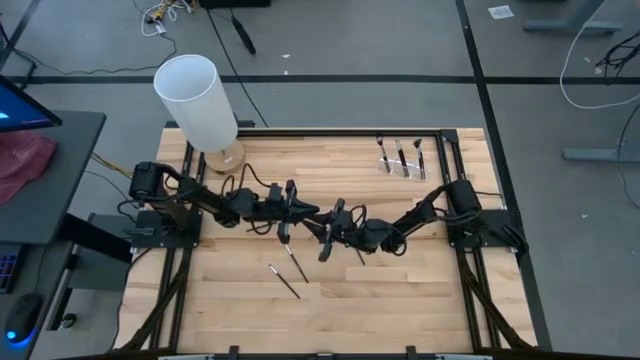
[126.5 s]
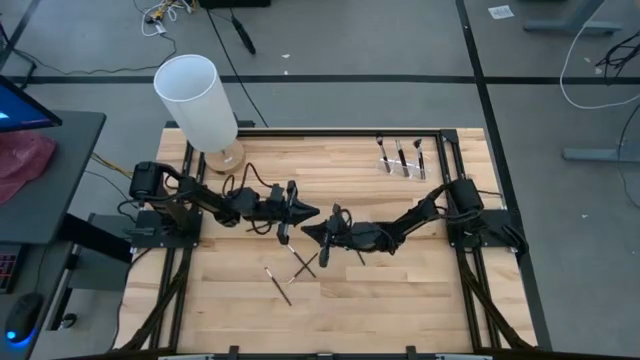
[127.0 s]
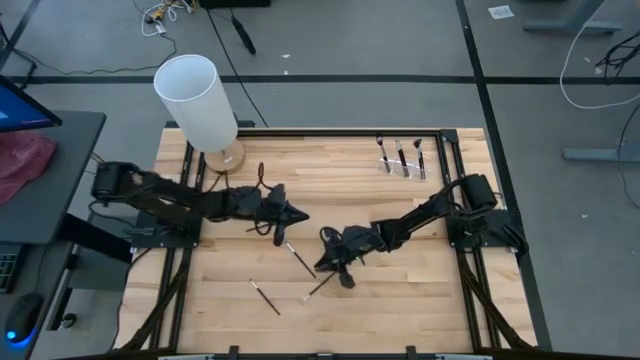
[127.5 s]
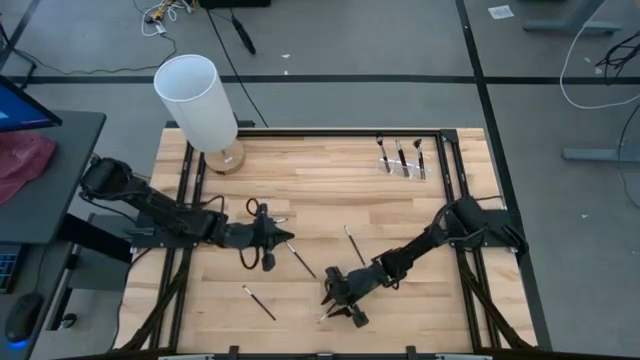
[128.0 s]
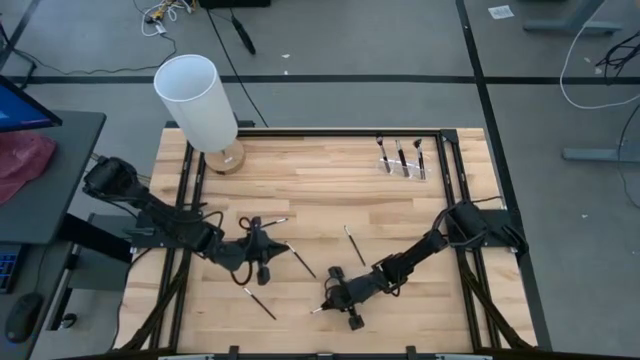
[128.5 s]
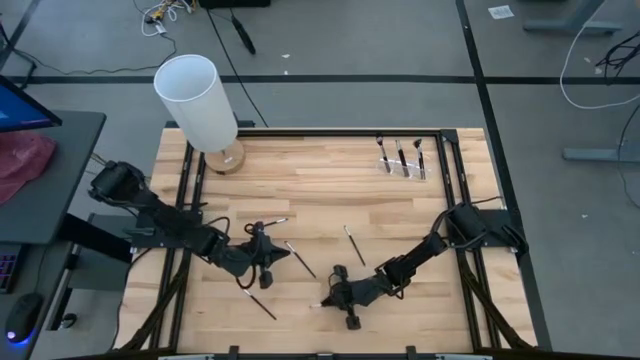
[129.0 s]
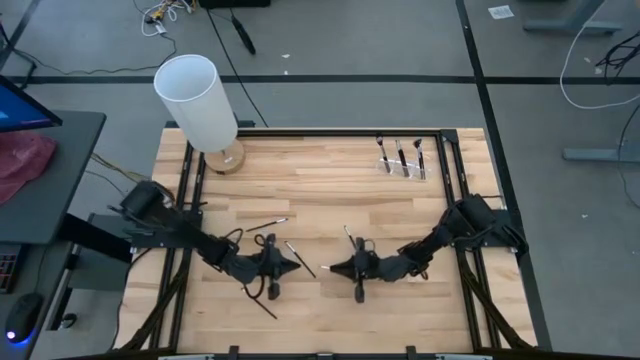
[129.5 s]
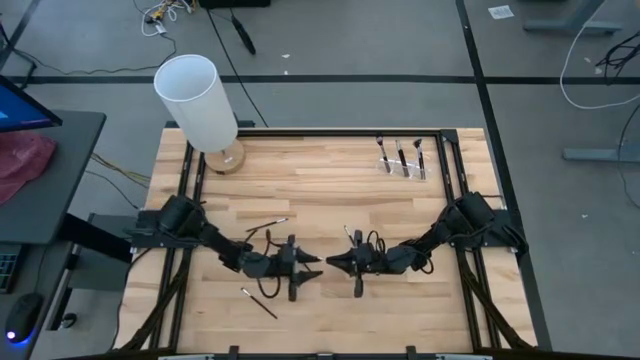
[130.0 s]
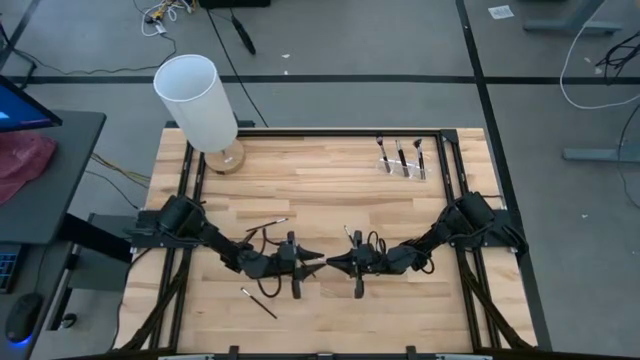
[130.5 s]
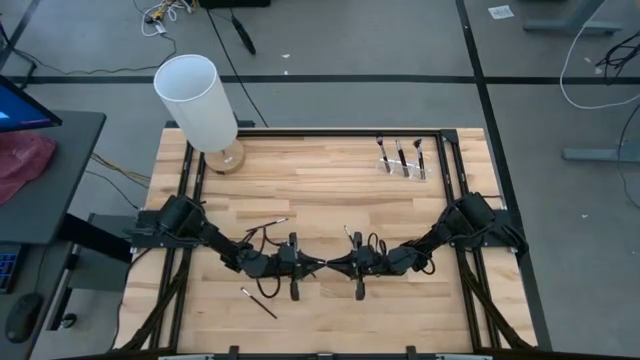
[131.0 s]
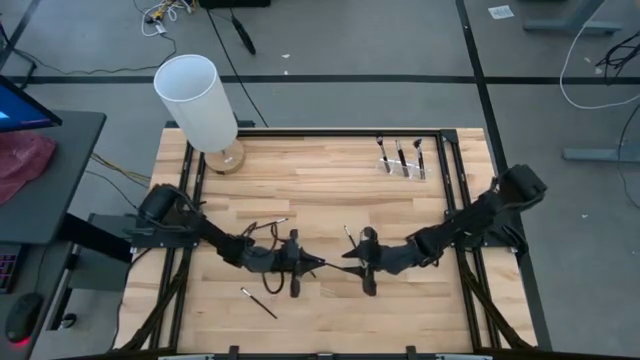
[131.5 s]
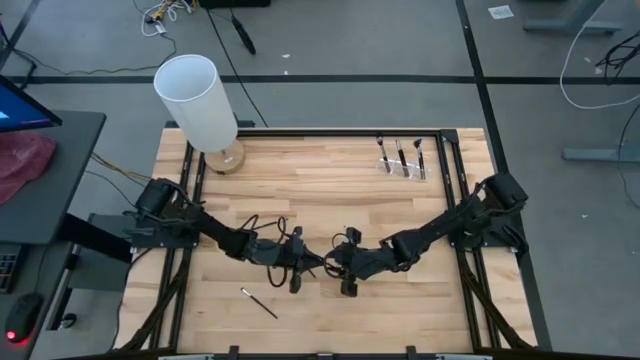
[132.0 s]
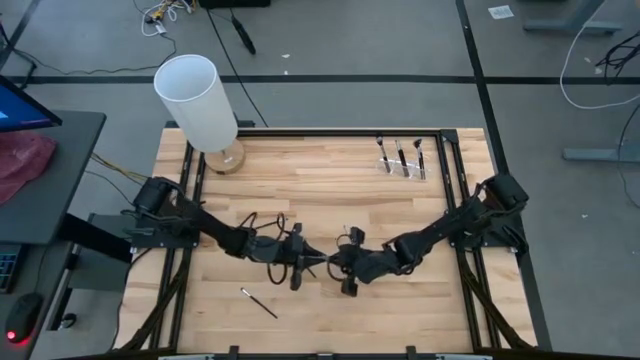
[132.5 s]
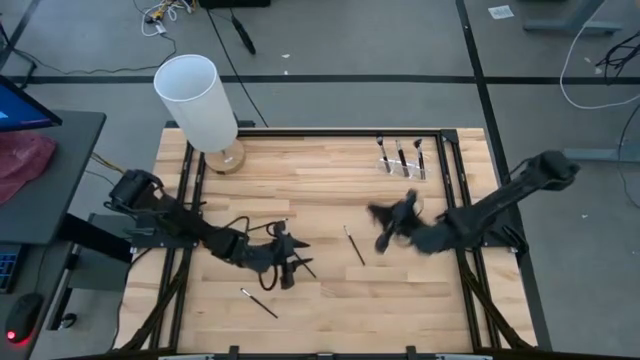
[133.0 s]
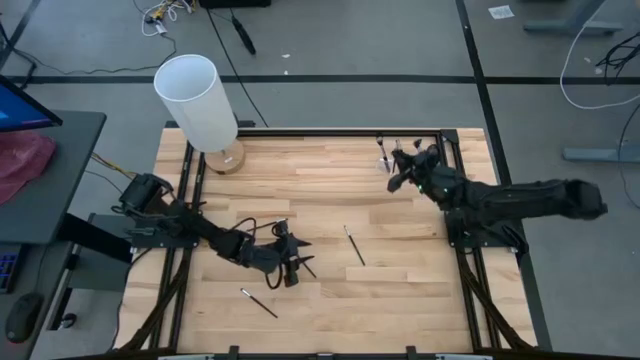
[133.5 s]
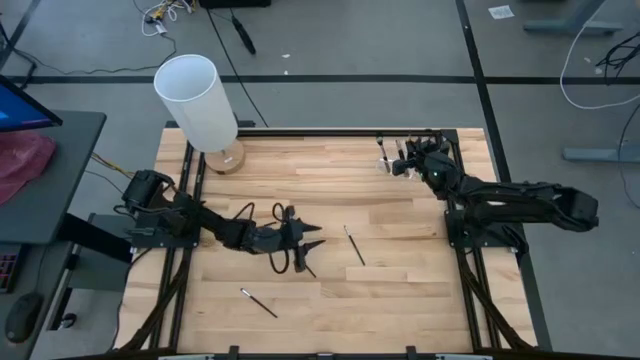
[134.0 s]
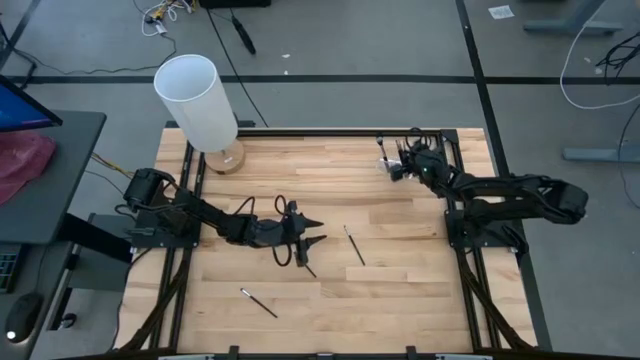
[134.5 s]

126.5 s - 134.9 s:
Task: Put items in baskets/containers
Put the eyeshadow brush into the transparent organizer

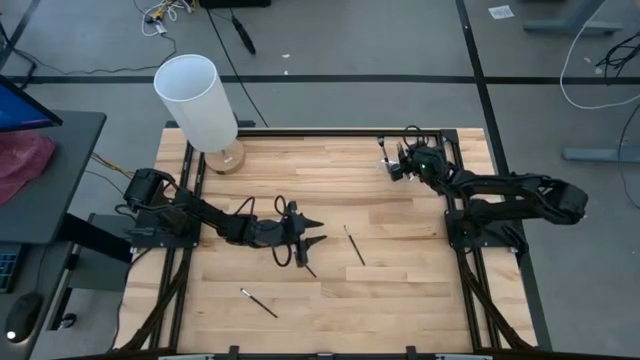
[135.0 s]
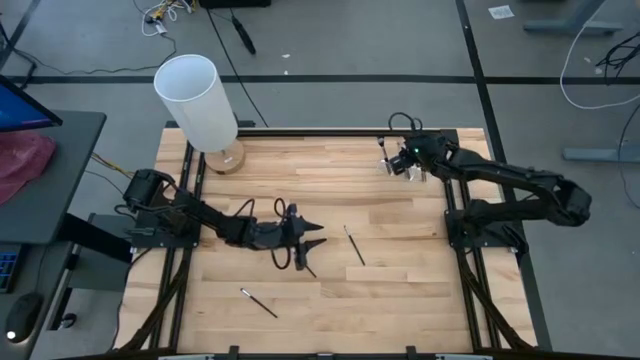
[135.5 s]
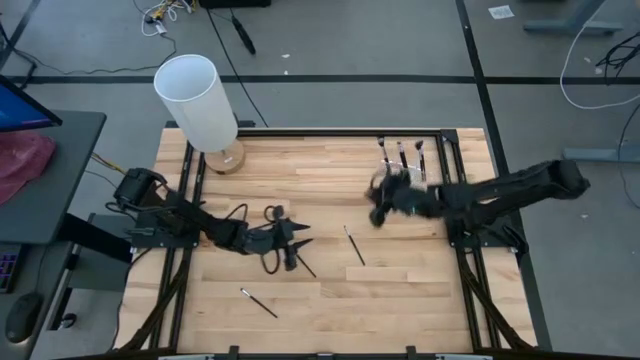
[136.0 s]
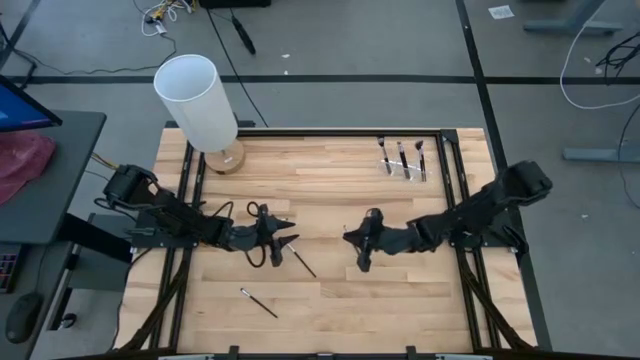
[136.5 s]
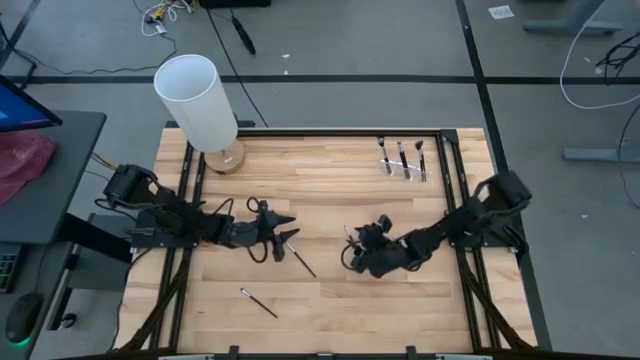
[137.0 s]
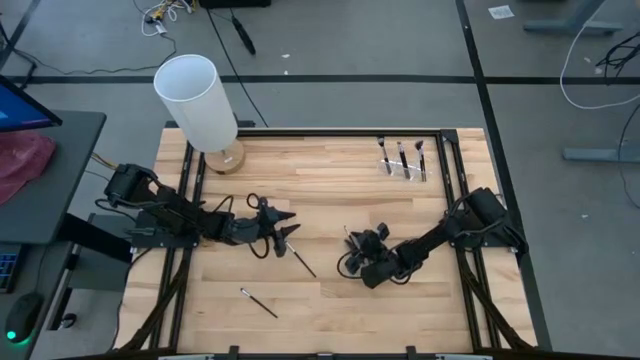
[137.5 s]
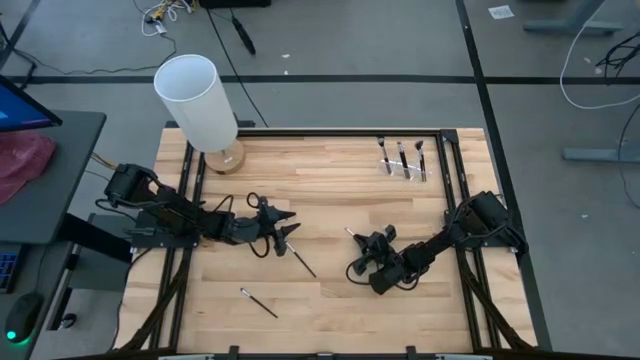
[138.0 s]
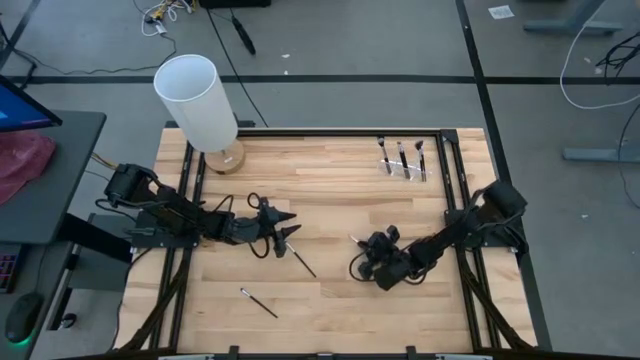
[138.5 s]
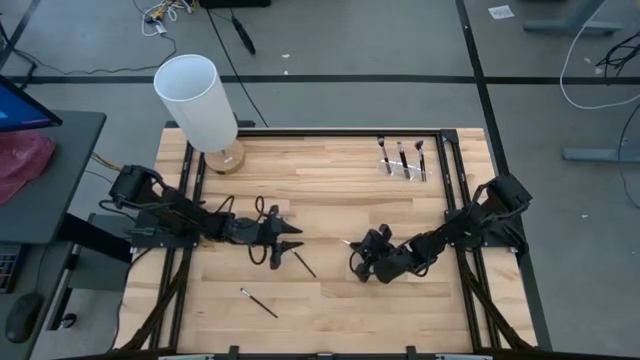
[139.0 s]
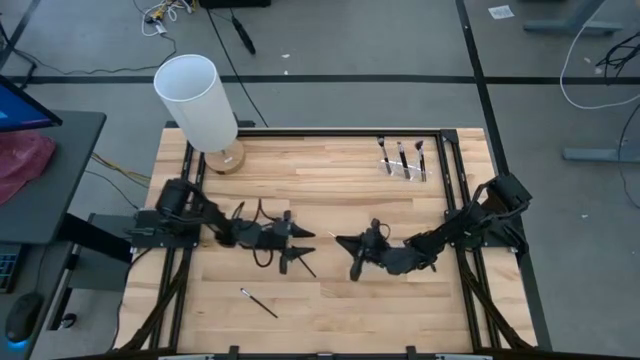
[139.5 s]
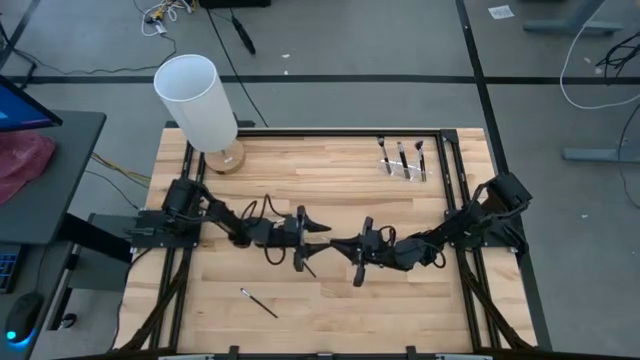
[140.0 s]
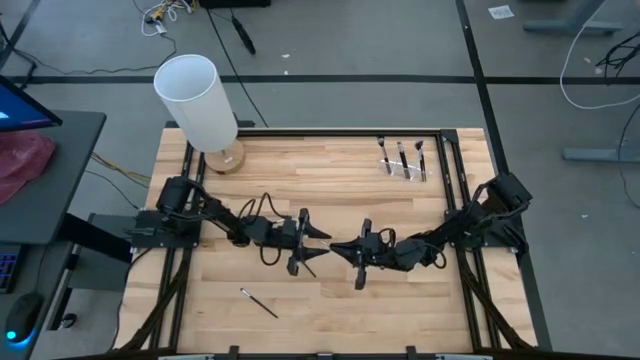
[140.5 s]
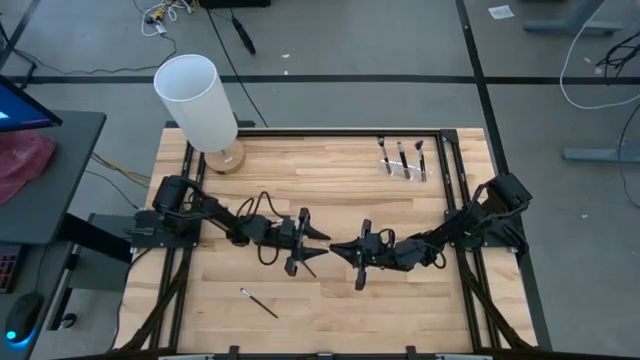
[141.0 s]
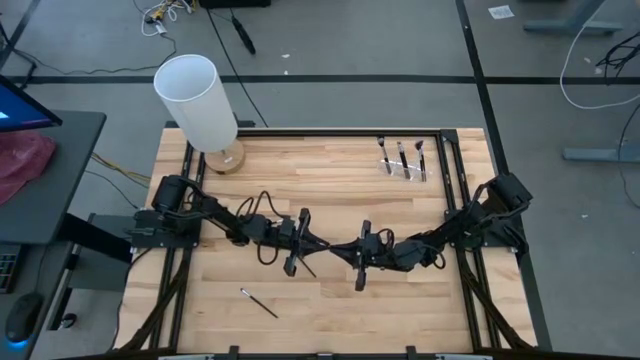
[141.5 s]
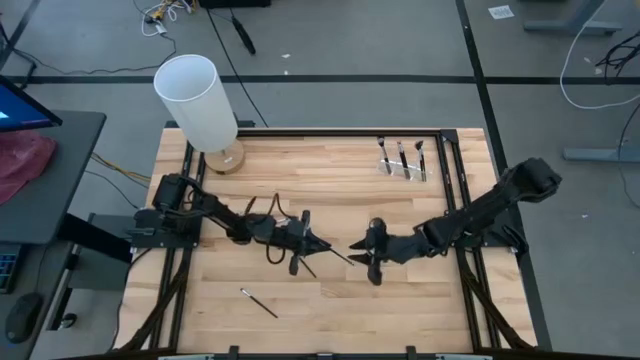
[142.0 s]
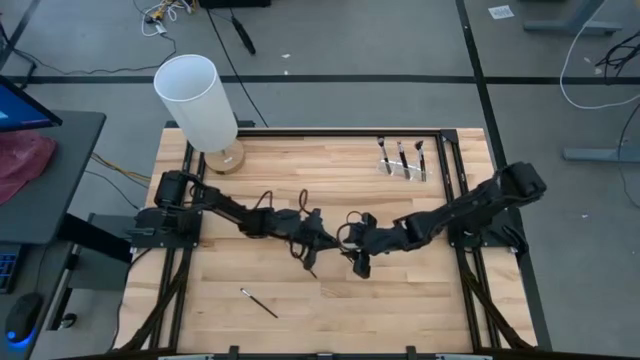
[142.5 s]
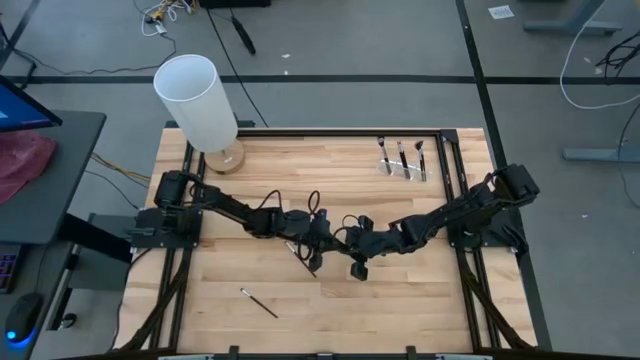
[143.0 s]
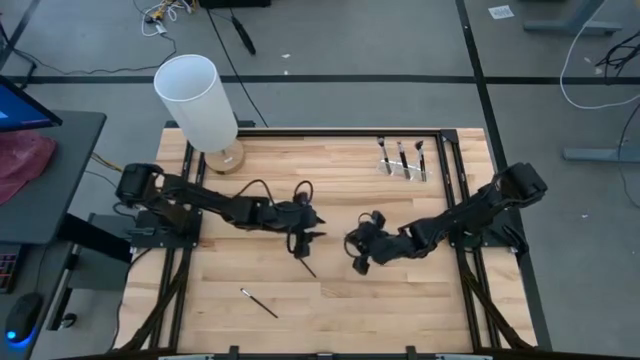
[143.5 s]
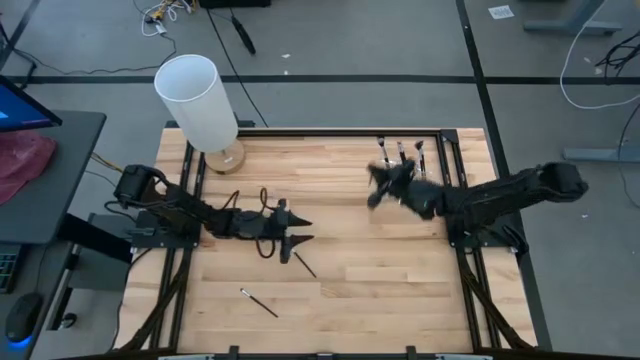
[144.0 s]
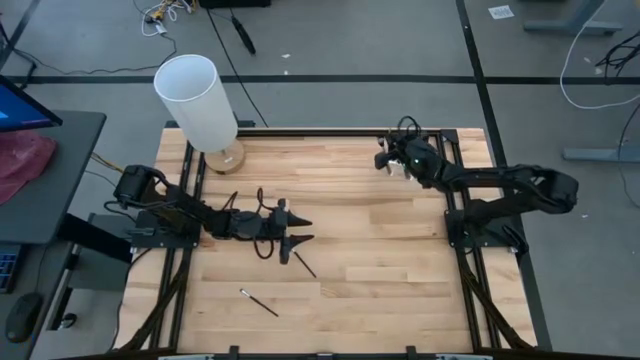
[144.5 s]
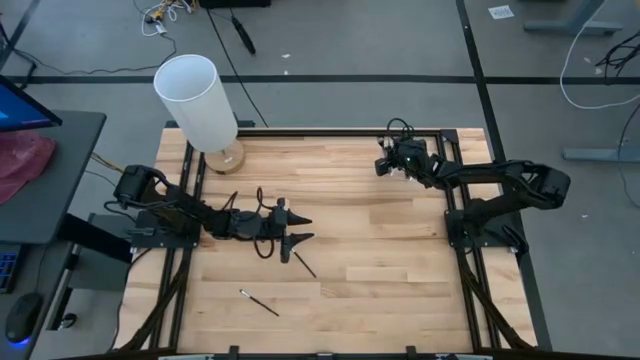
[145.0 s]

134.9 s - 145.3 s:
Put the eyeshadow brush into the transparent organizer

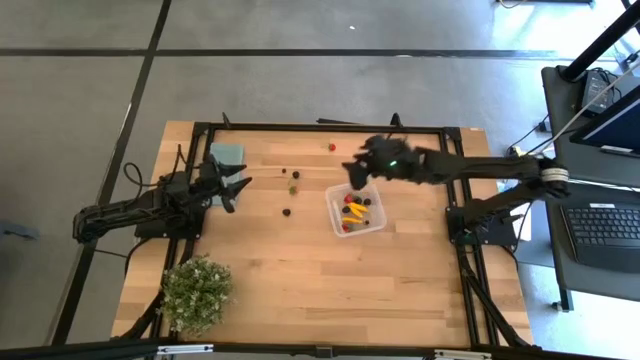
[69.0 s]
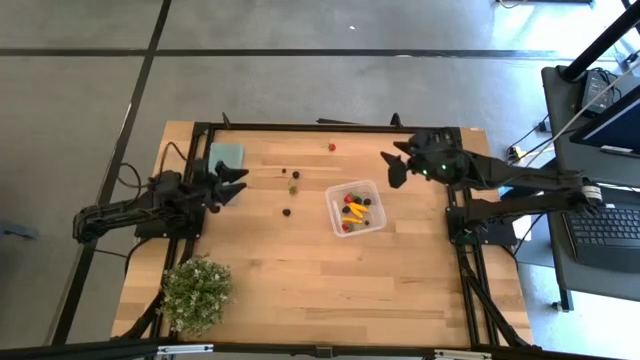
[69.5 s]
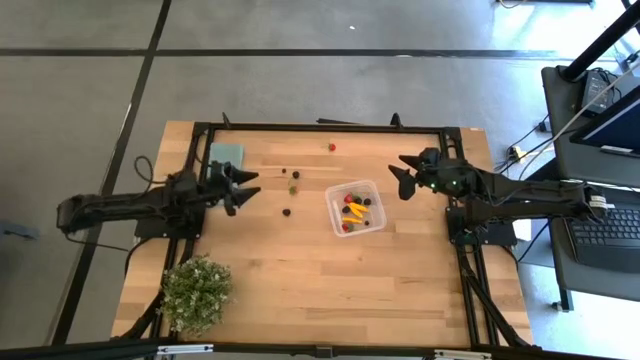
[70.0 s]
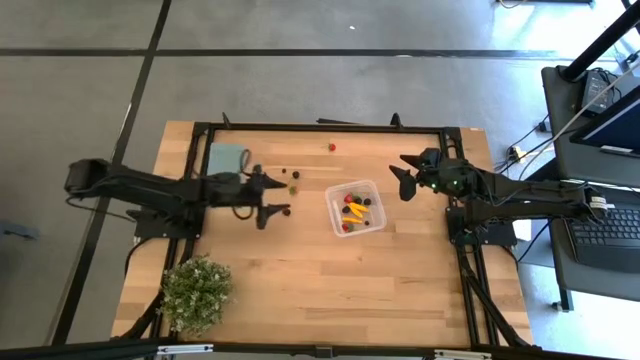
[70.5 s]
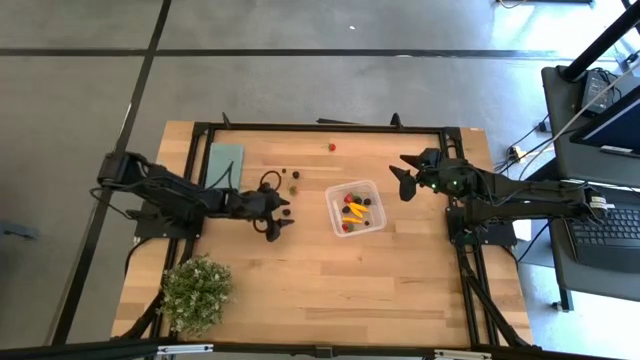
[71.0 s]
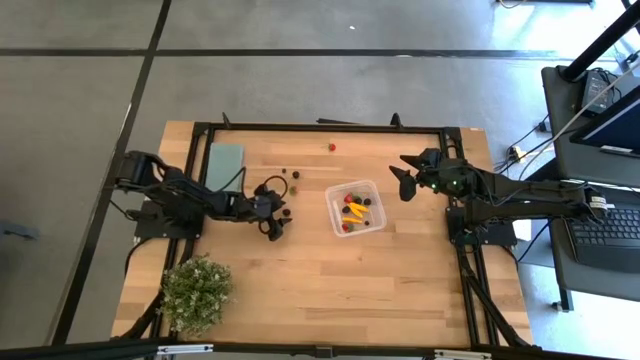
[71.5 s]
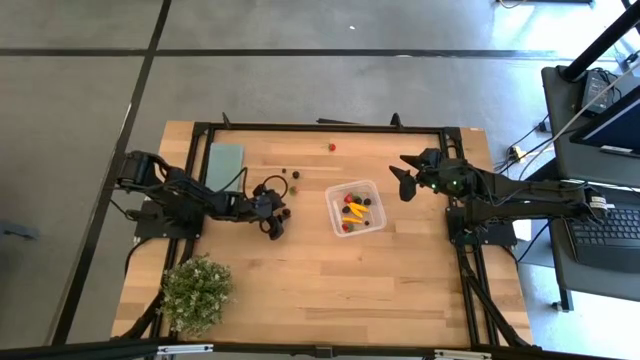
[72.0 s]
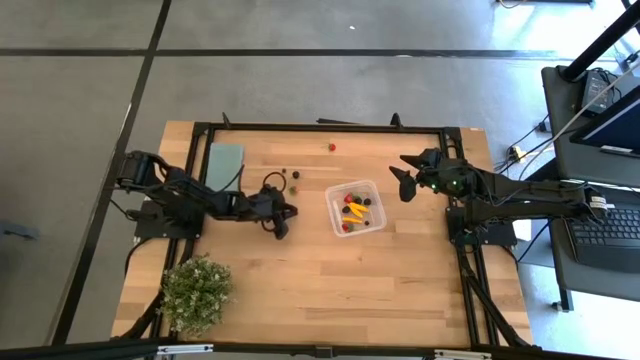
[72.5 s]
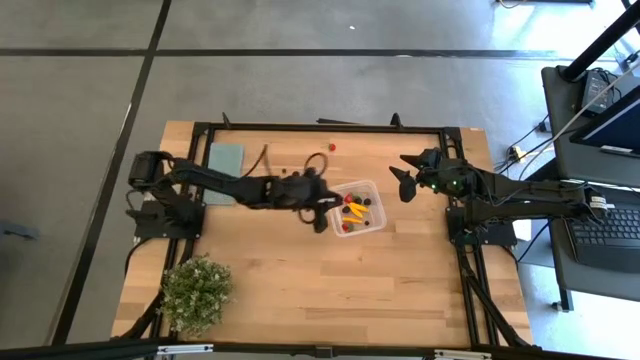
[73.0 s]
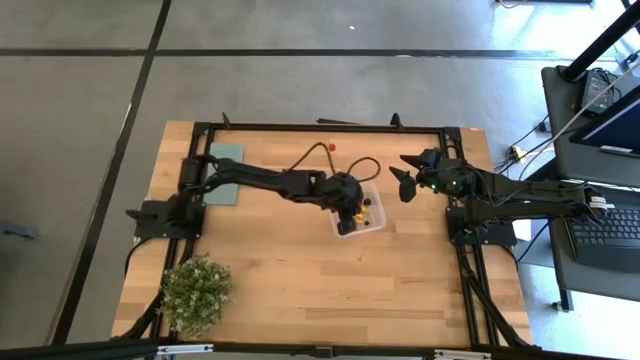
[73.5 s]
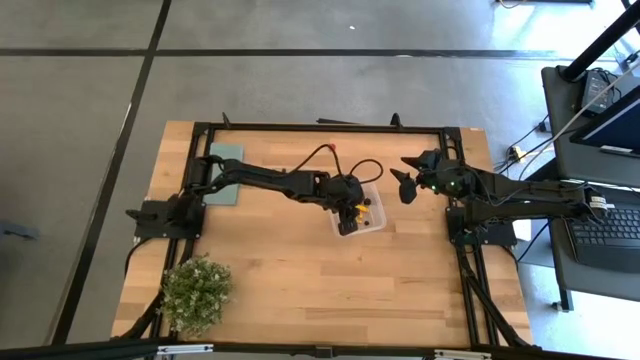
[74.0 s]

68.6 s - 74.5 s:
Task: Pick and placing Produce into tupperware
Put the middle left blackberry into the transparent bin
